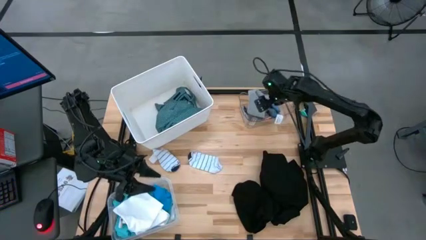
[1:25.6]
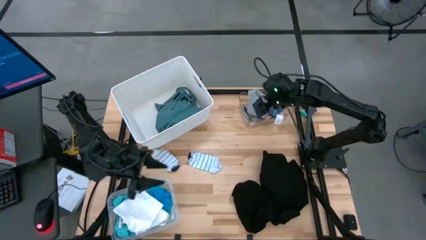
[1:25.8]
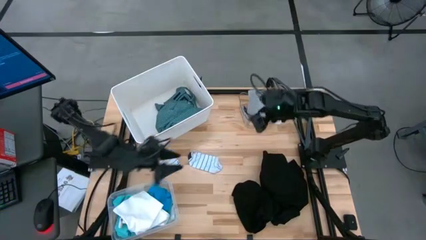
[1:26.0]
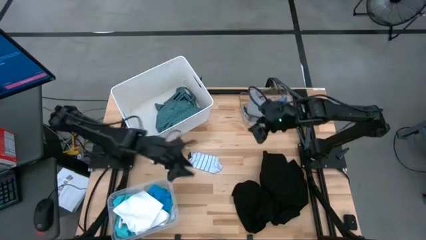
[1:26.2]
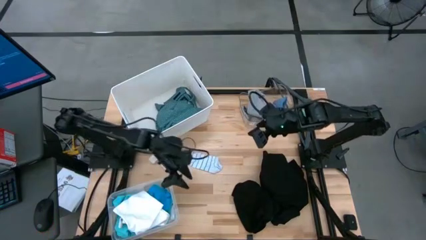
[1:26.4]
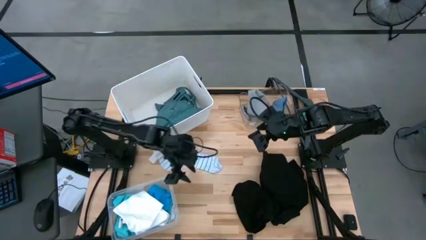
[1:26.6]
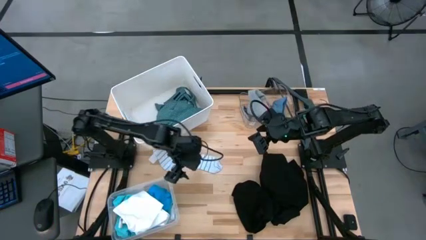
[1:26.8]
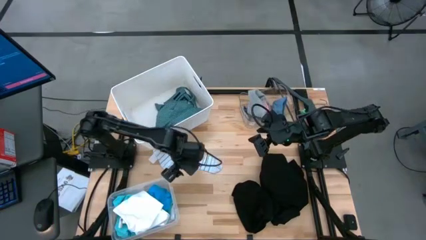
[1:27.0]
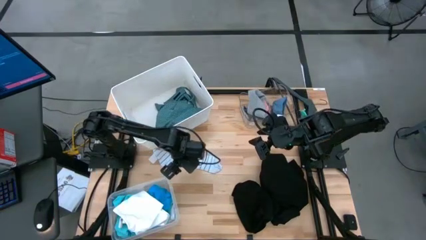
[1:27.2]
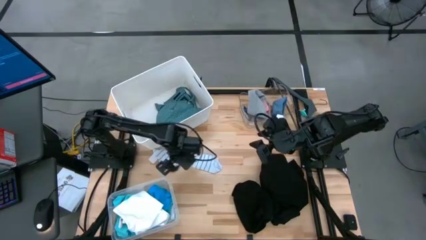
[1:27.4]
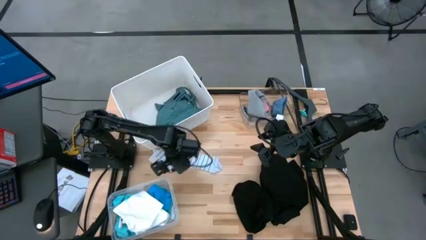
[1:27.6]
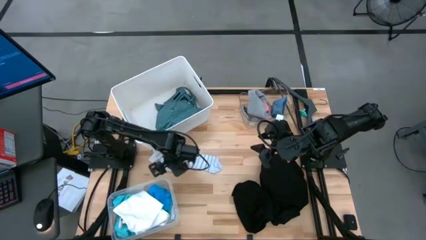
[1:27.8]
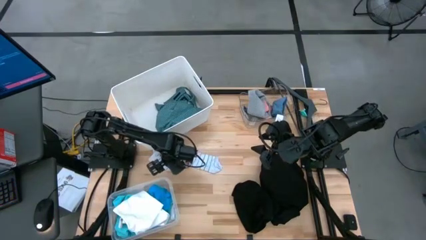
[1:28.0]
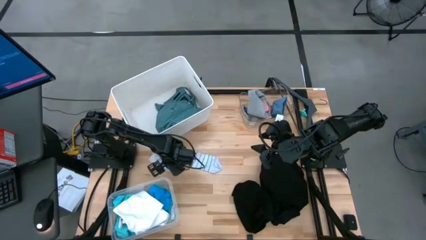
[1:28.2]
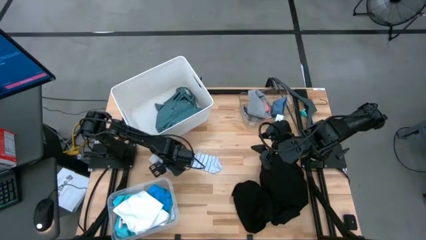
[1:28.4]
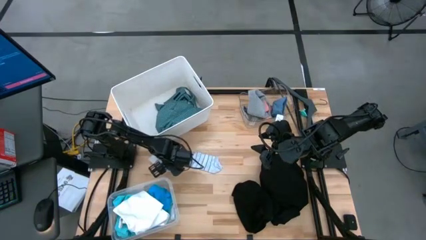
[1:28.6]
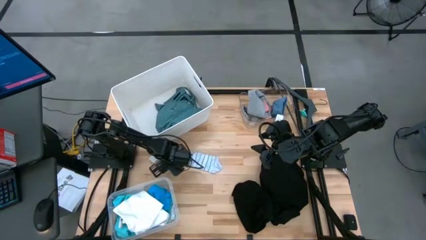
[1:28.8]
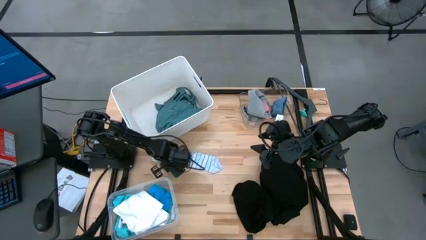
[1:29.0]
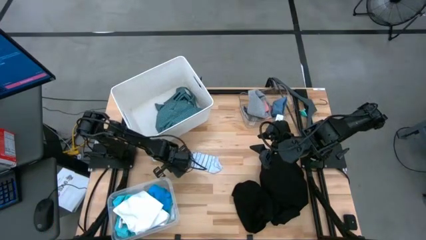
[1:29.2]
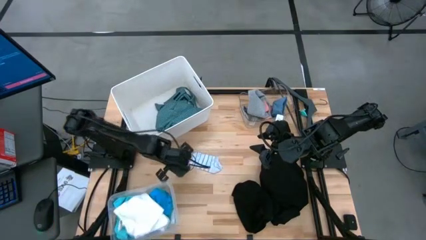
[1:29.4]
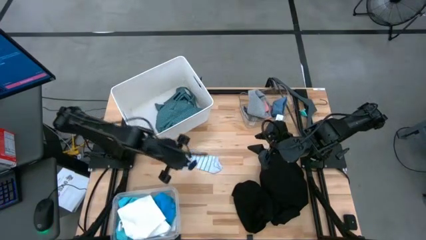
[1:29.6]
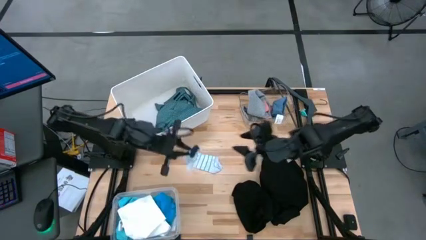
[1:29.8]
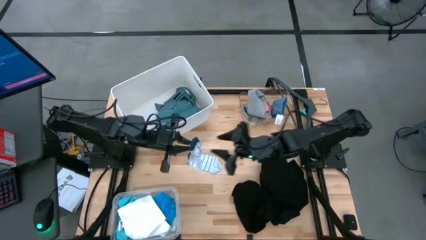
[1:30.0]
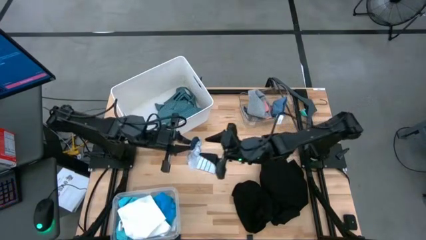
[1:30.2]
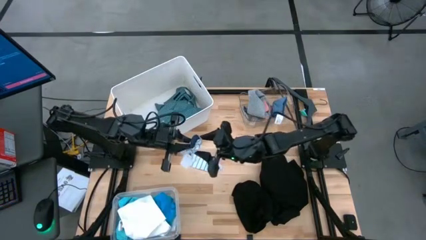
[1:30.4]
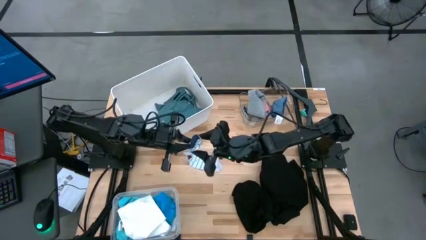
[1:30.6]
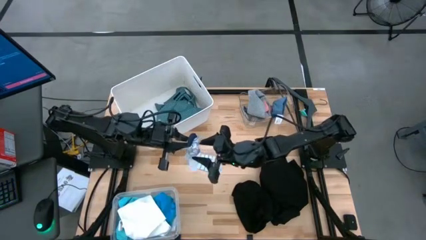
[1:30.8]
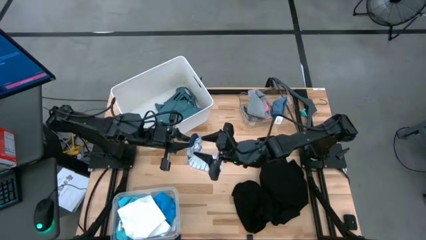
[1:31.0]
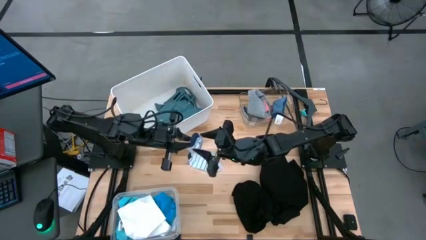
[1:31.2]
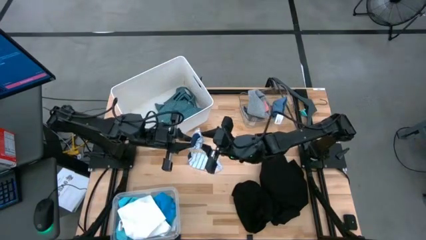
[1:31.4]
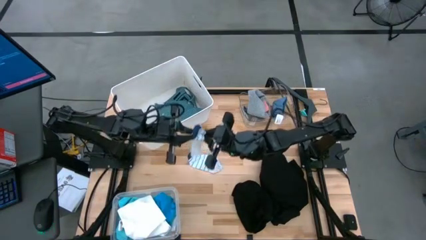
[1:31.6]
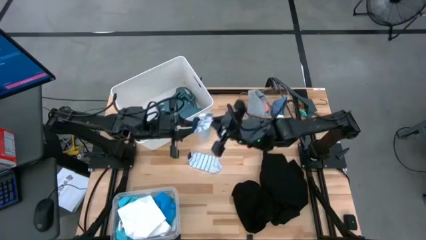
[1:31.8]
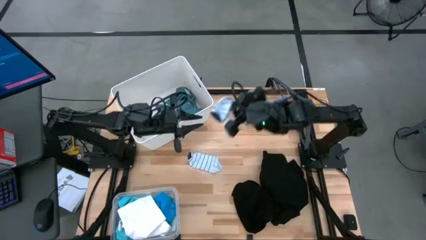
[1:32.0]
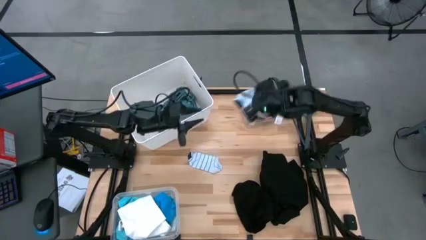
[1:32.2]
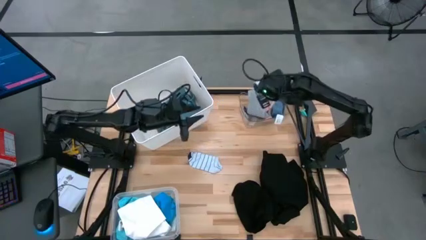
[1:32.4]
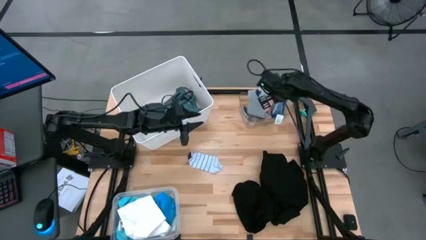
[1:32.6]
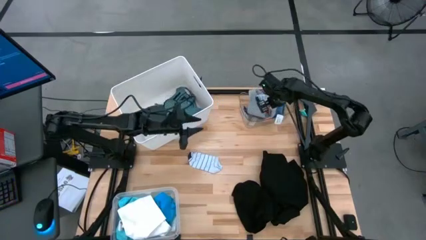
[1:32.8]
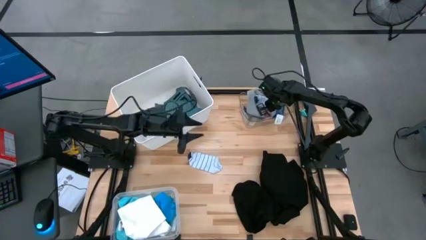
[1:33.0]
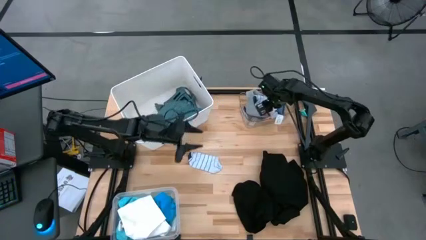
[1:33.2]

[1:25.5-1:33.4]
Task: Pick & Place Cloths
Put the white sock into the top transparent bin

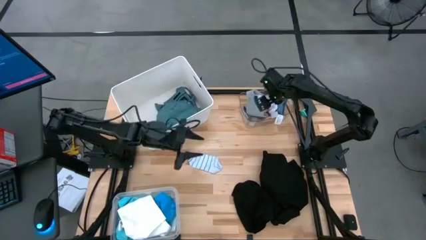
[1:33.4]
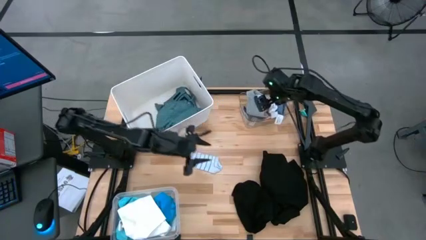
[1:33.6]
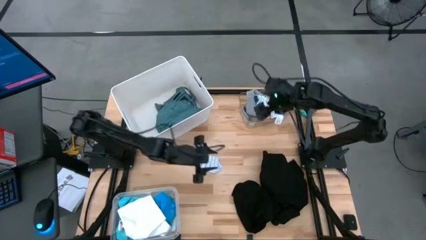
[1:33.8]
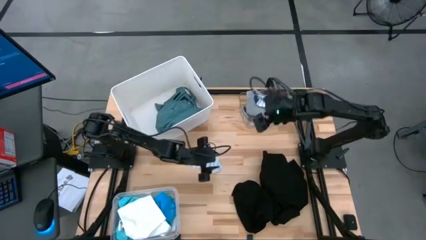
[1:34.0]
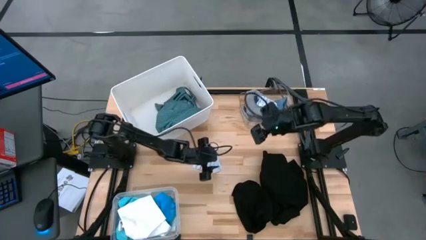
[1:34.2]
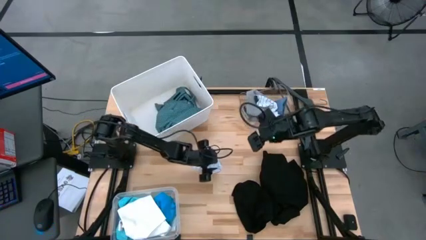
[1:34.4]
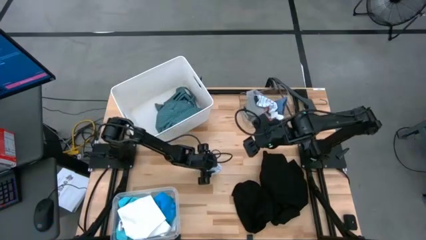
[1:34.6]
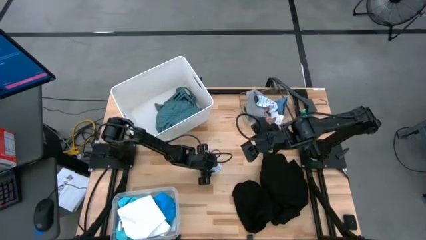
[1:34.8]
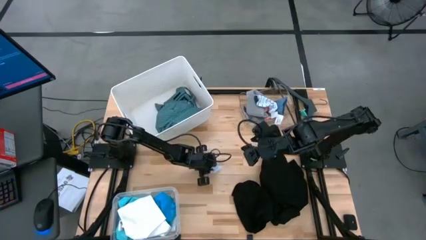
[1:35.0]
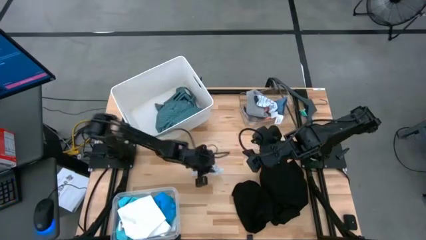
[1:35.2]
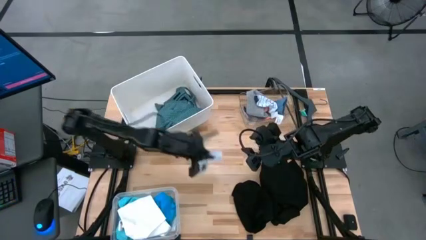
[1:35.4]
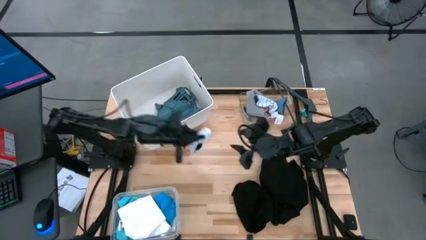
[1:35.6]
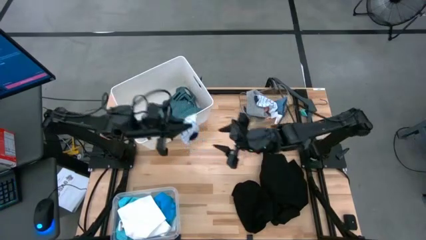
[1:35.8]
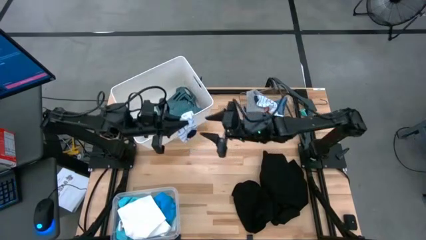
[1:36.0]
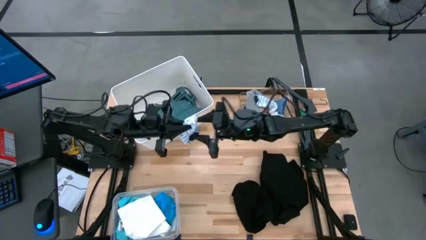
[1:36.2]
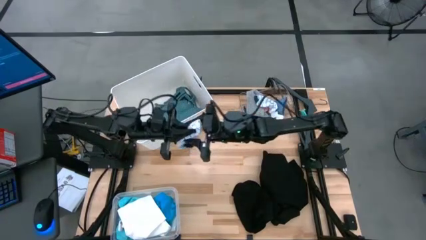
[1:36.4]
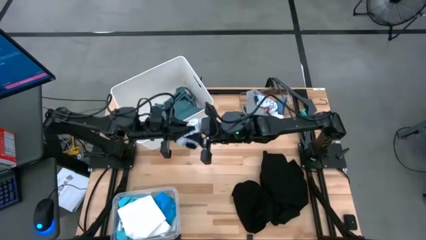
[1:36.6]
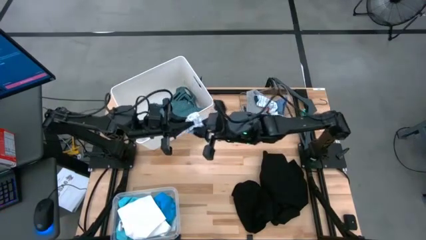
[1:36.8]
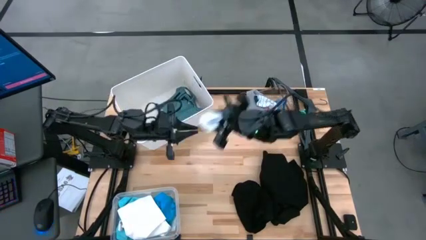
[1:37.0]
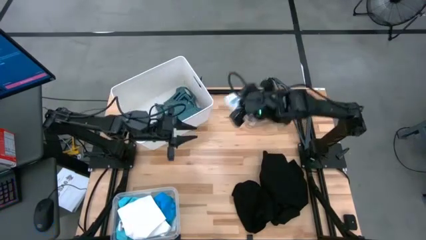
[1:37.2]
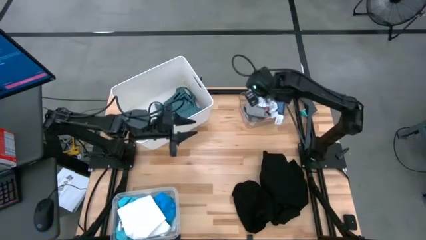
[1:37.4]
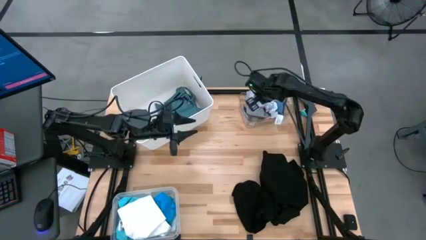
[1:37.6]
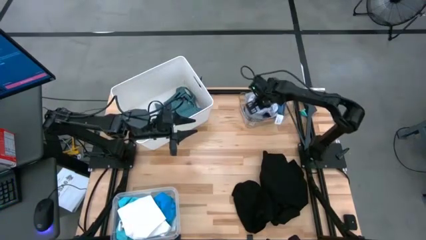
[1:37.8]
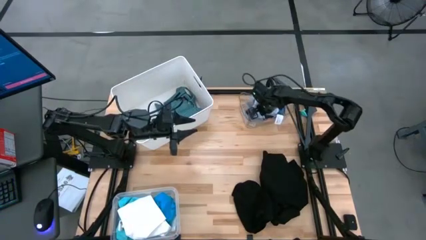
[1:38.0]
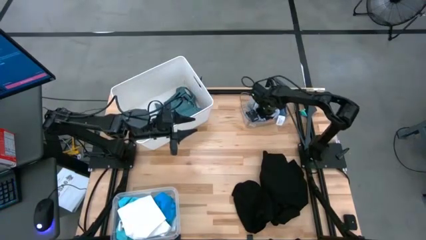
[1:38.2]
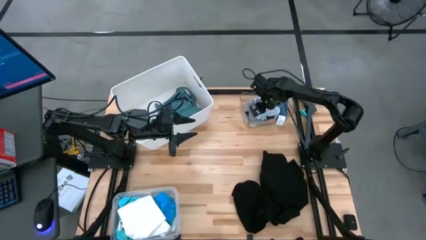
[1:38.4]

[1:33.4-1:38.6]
Put the white sock into the top transparent bin

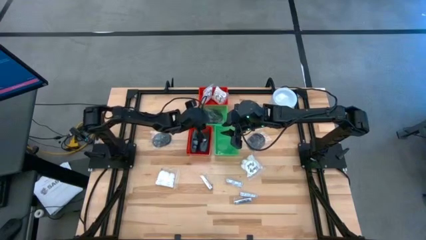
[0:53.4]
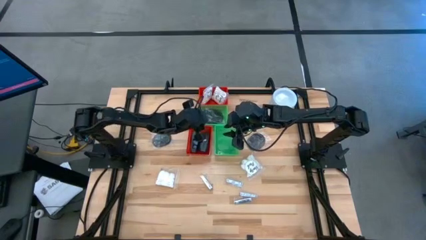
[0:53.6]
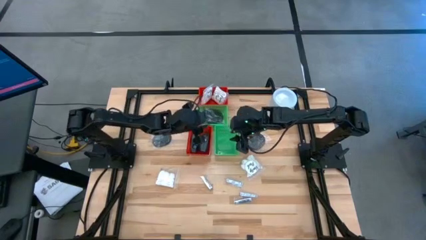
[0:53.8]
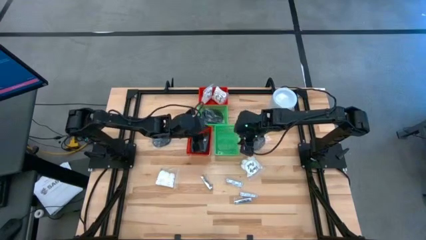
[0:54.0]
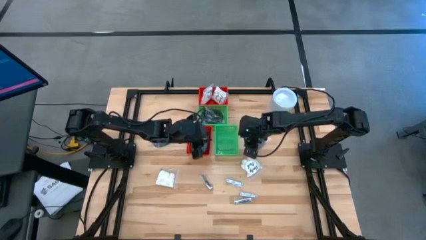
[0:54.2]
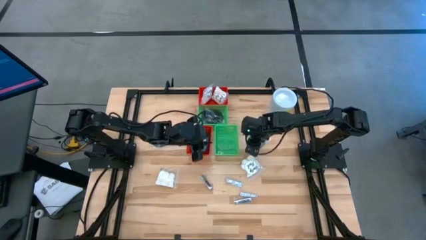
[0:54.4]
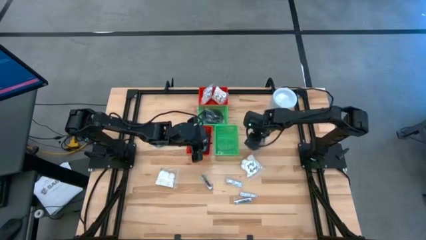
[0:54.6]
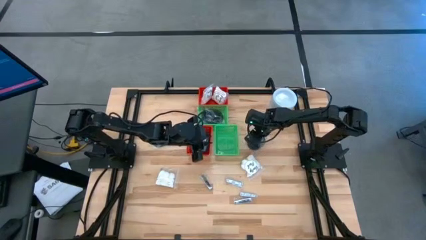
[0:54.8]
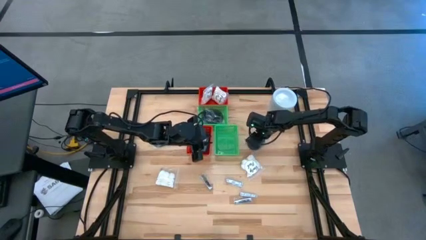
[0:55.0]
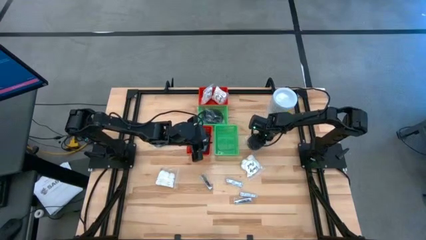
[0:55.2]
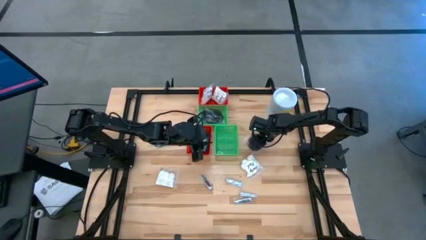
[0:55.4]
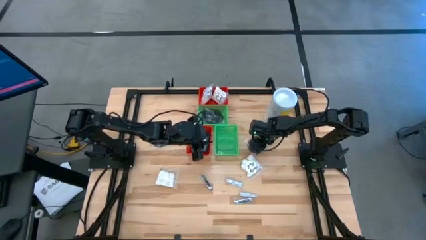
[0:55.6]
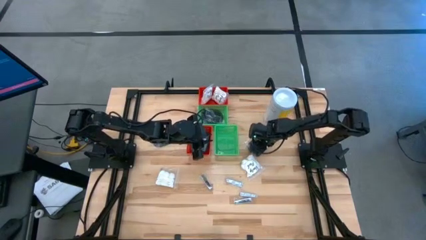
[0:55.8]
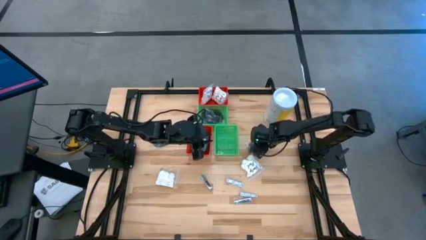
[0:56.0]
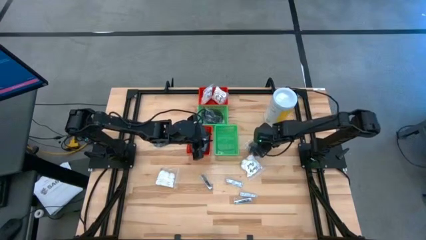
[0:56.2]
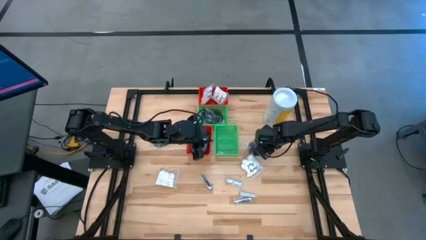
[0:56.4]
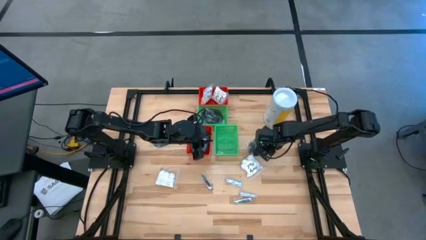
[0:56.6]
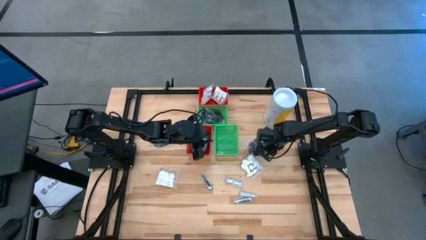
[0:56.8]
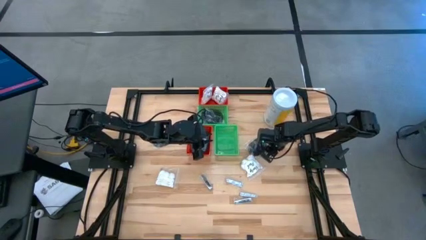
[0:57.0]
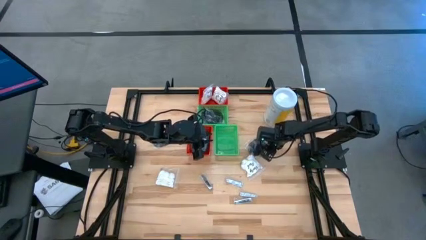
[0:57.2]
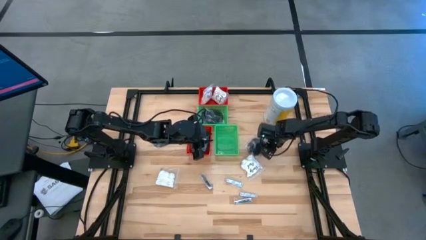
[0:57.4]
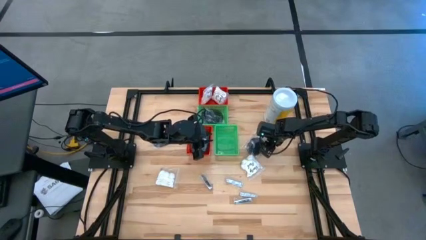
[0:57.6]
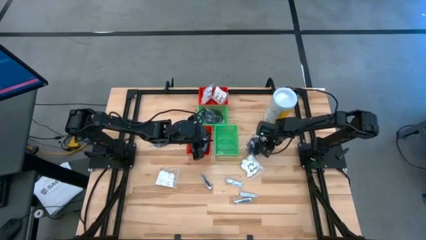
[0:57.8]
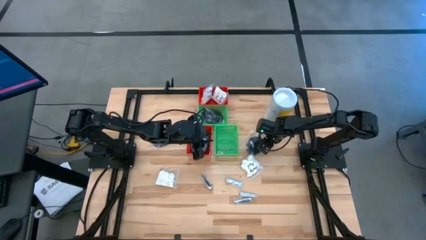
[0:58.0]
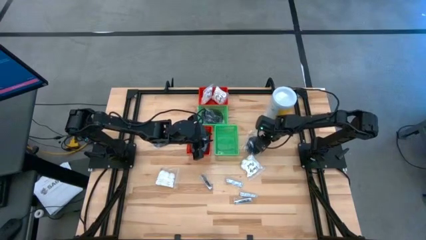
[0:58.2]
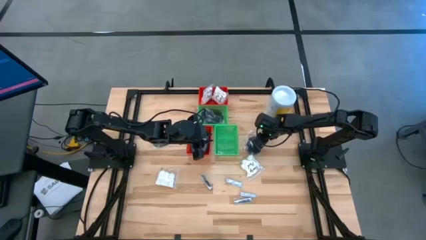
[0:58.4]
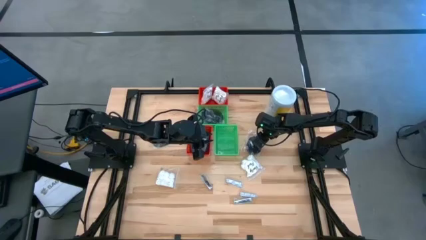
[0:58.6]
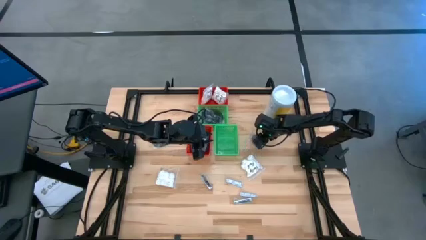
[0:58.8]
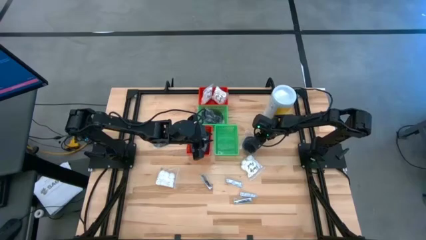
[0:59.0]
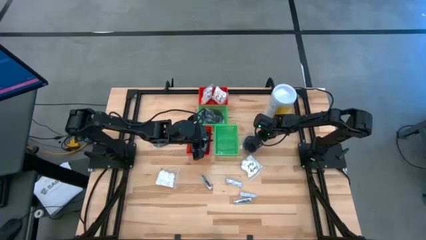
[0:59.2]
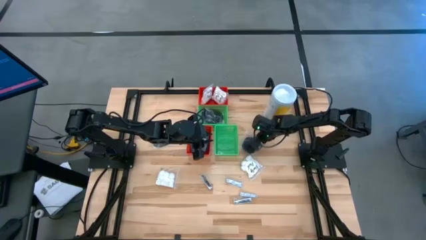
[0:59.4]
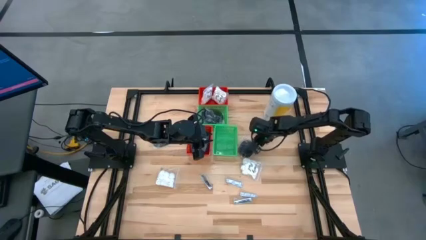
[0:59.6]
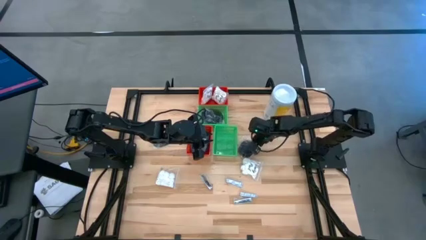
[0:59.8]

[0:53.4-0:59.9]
Task: Pick & Place Travel size toiletries
Put the black hairbrush into the top green bin
